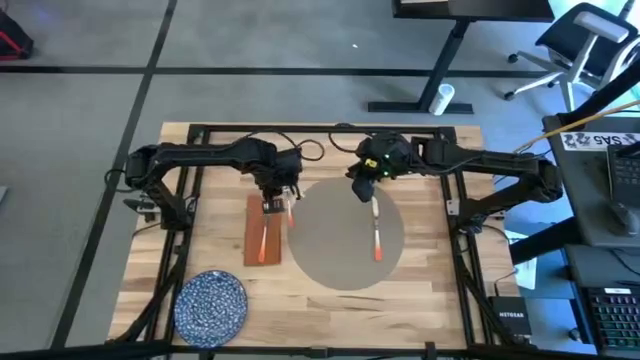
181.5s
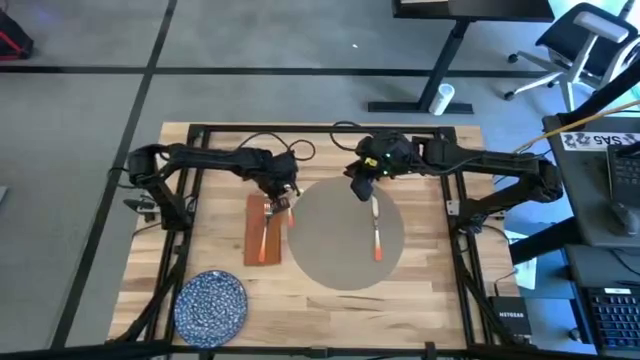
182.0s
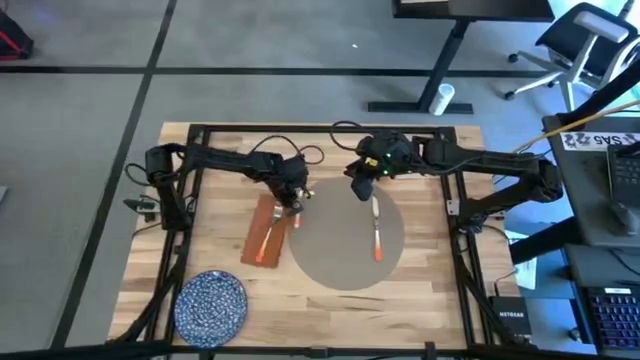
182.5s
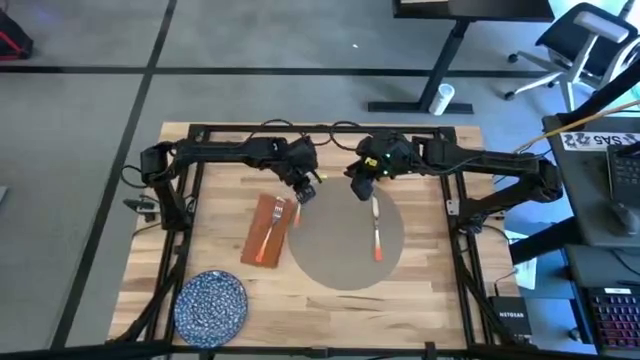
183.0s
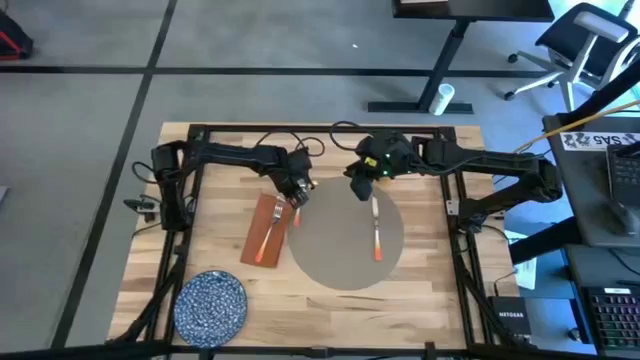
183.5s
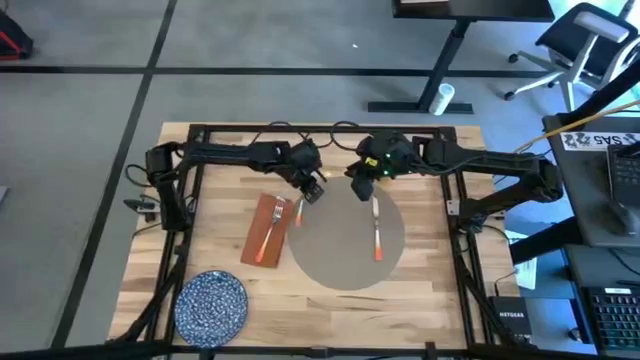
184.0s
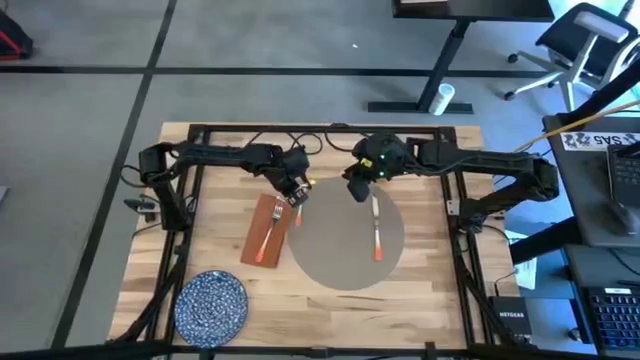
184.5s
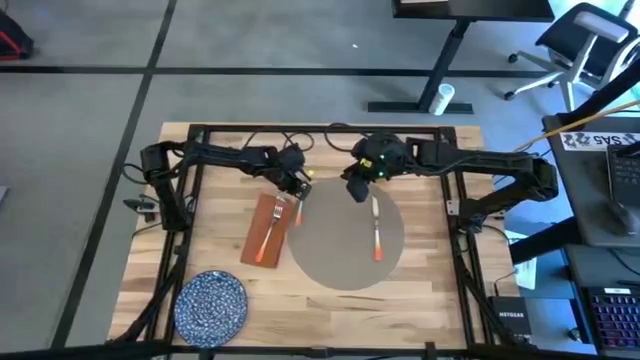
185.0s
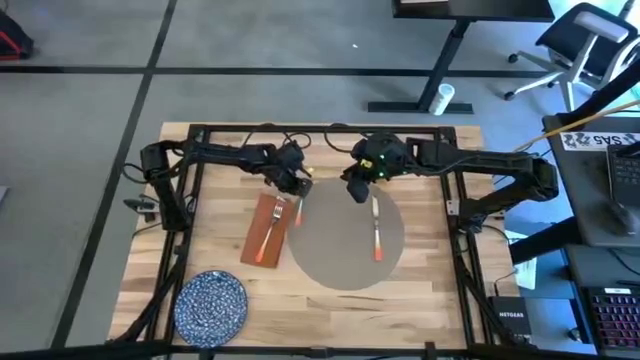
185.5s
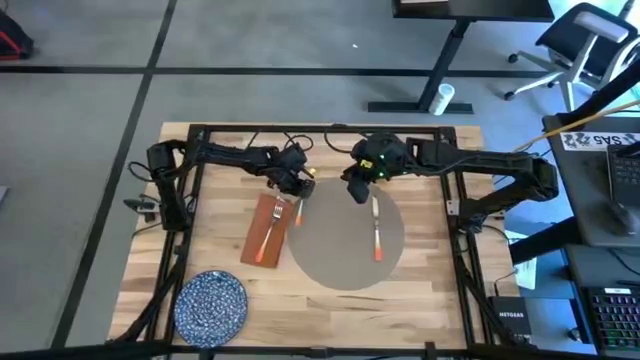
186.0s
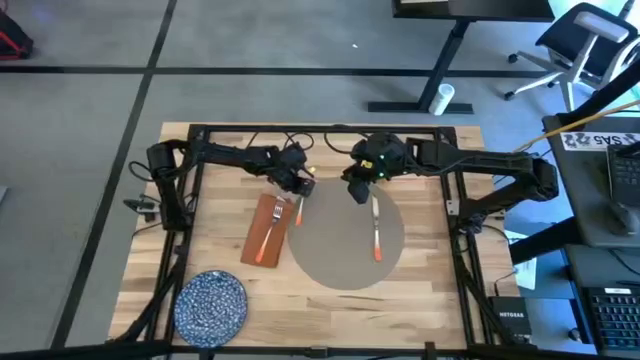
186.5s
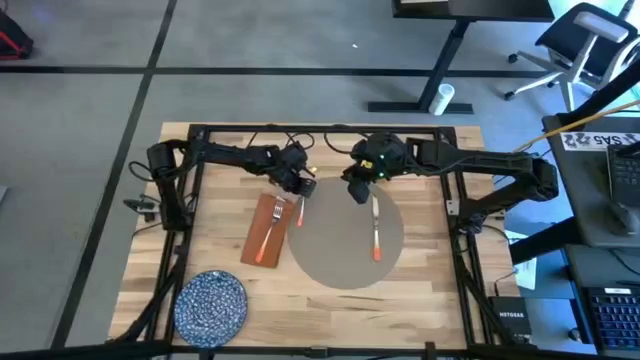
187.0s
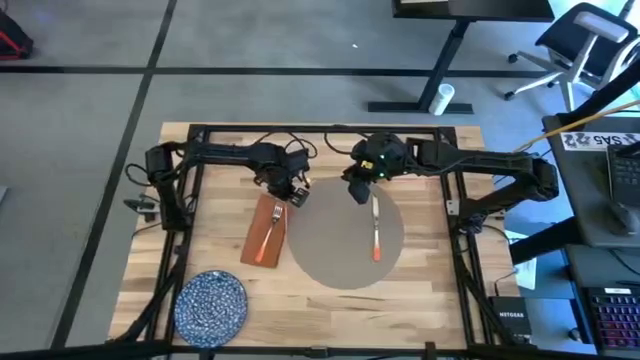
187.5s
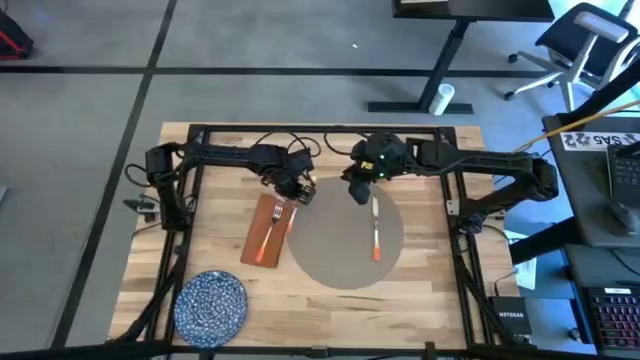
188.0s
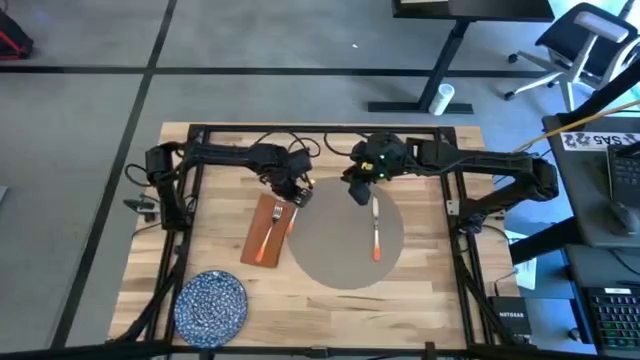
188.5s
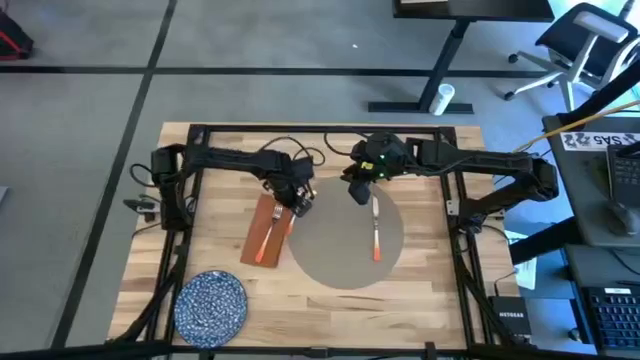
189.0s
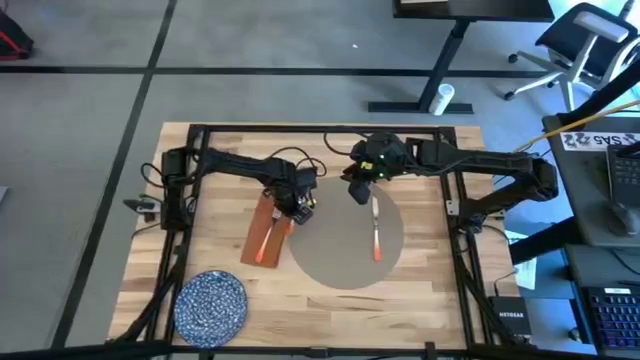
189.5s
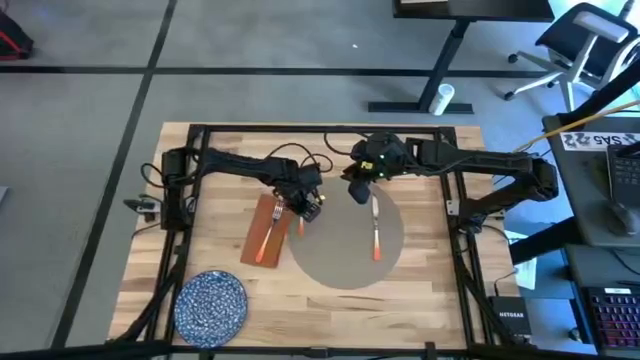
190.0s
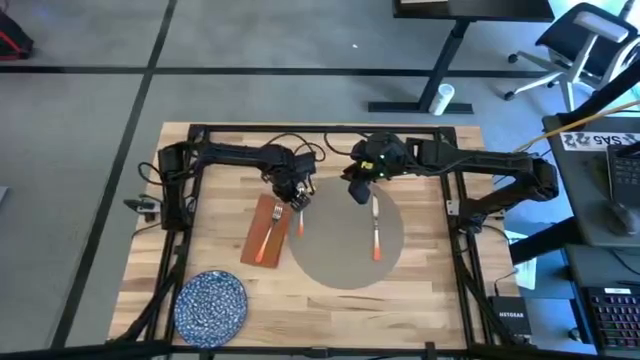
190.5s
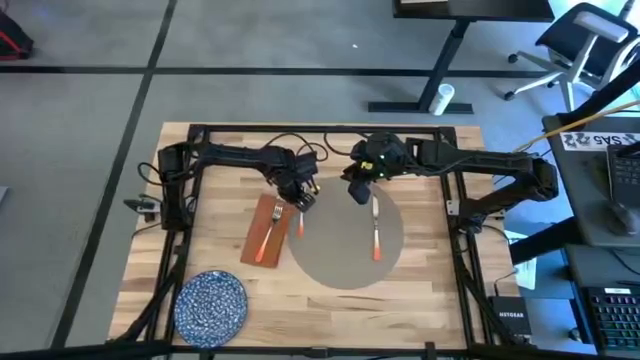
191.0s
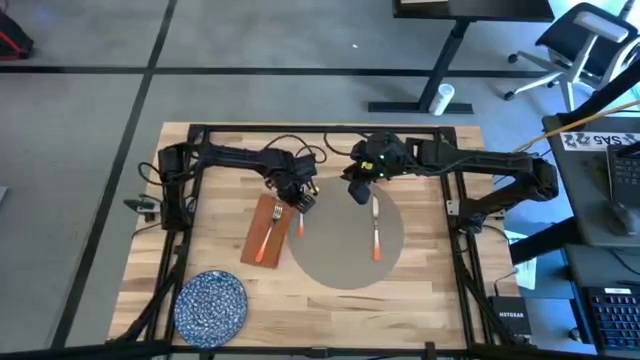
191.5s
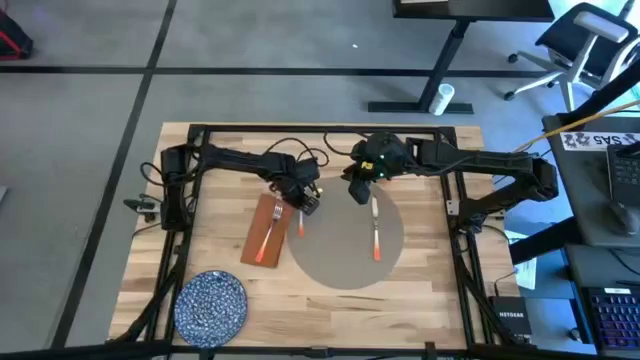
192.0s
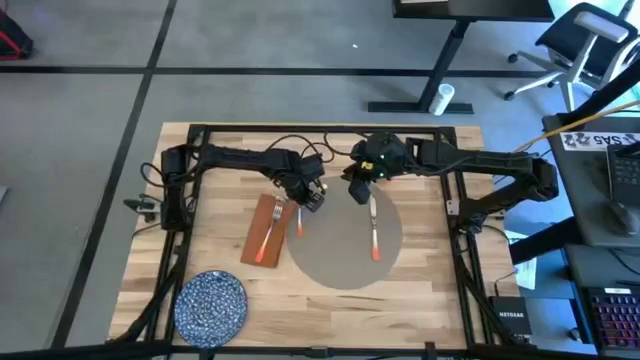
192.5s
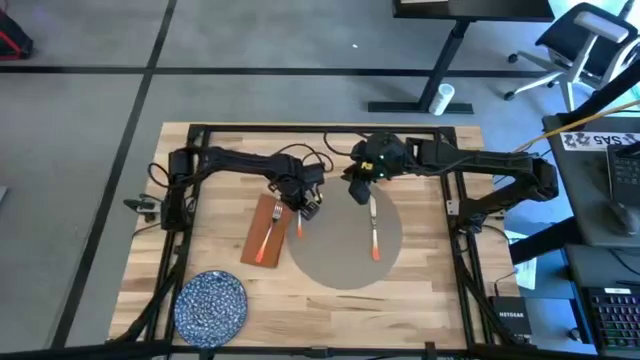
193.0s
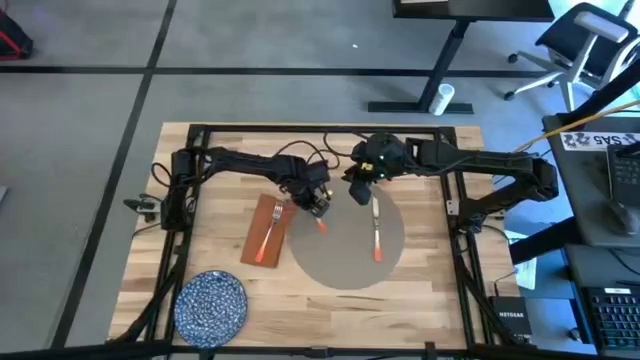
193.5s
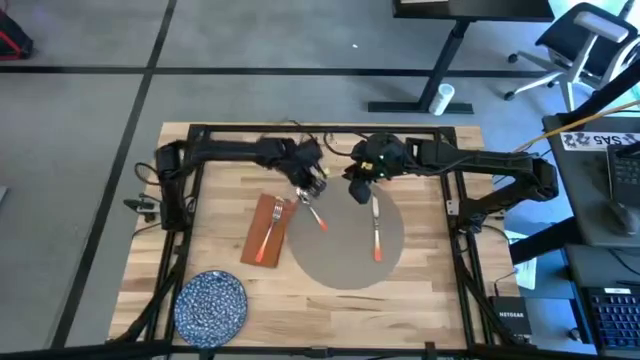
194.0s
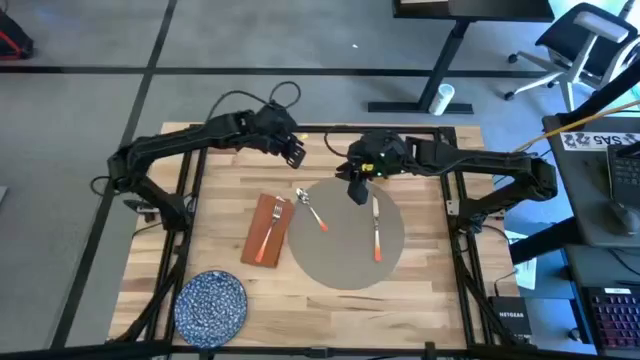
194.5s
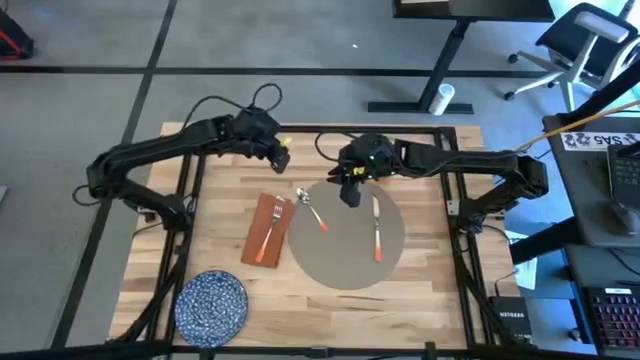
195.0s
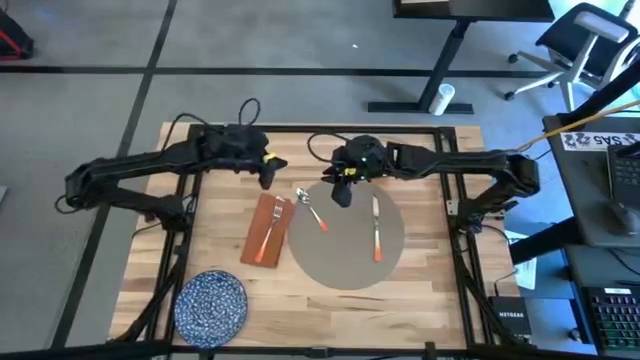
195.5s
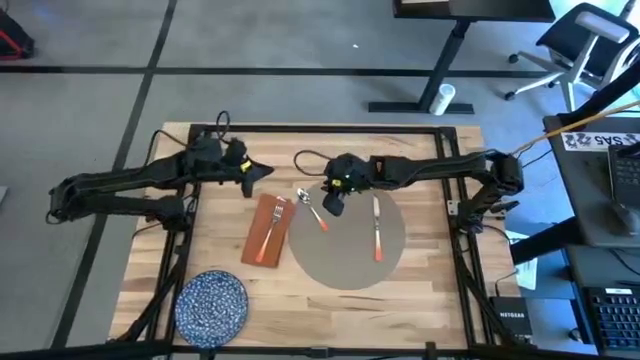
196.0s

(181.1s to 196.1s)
Task: Set table place
Put the orange spoon on the gray mat

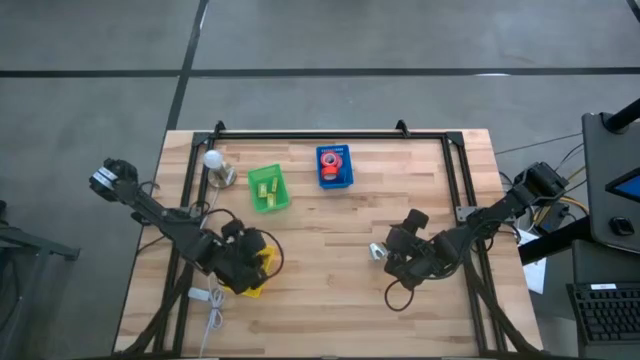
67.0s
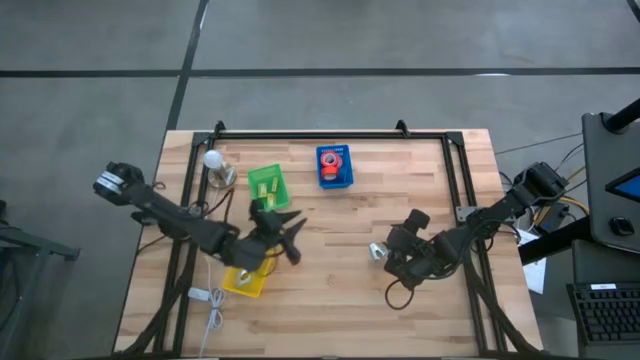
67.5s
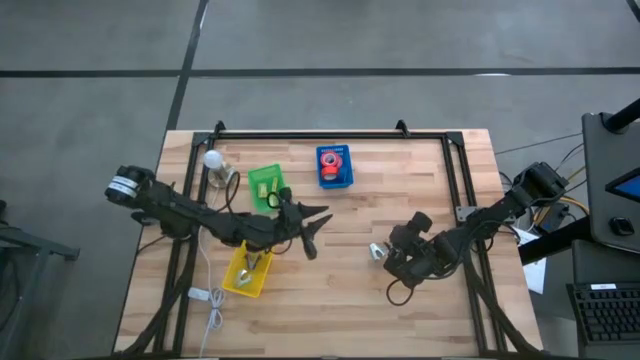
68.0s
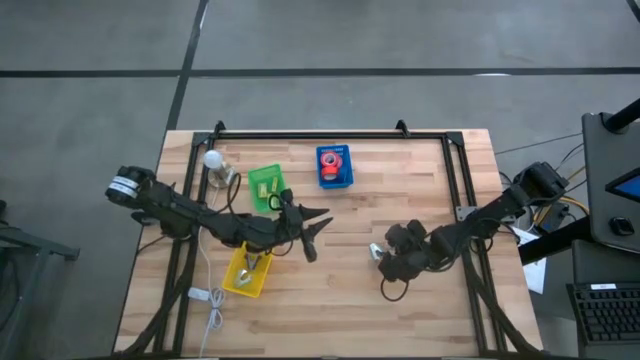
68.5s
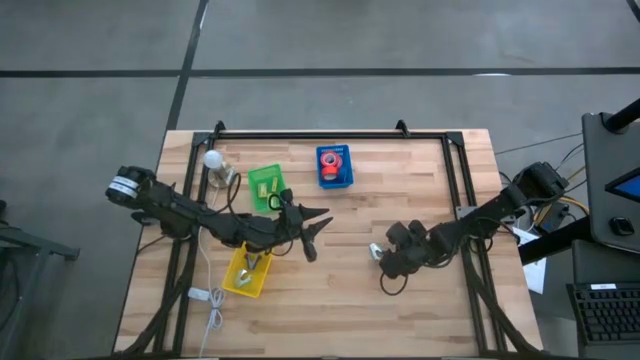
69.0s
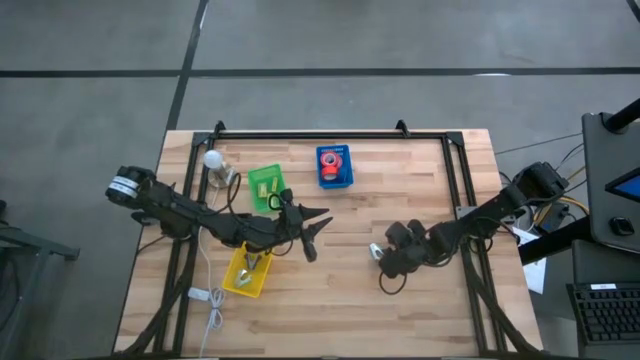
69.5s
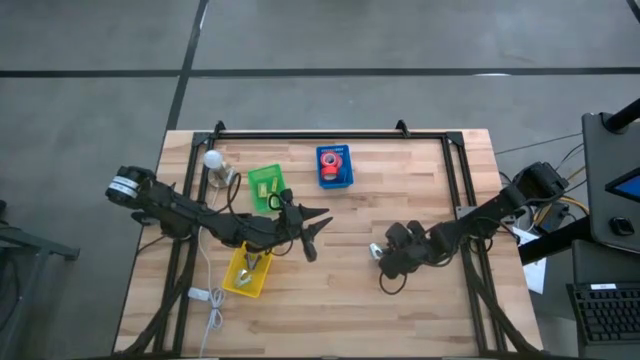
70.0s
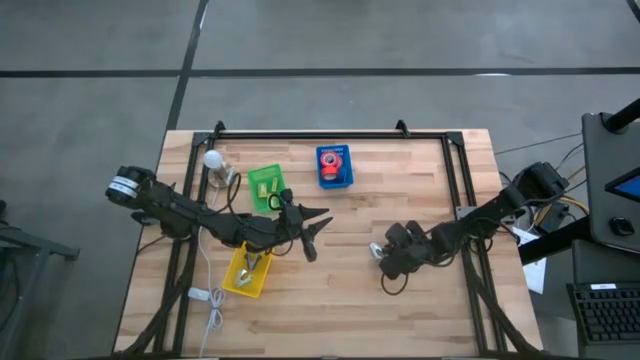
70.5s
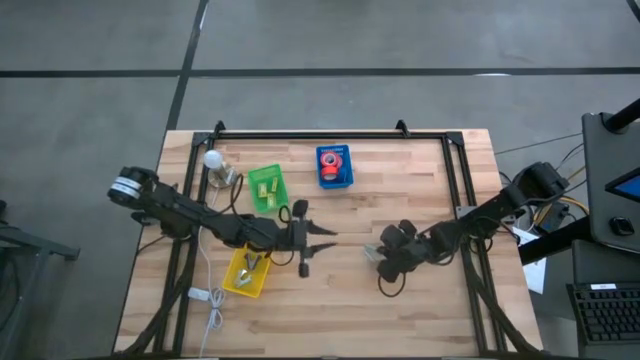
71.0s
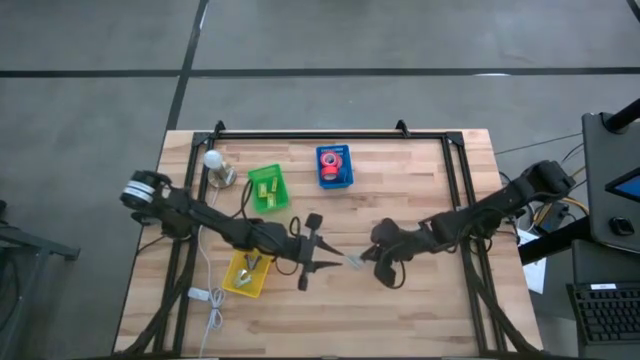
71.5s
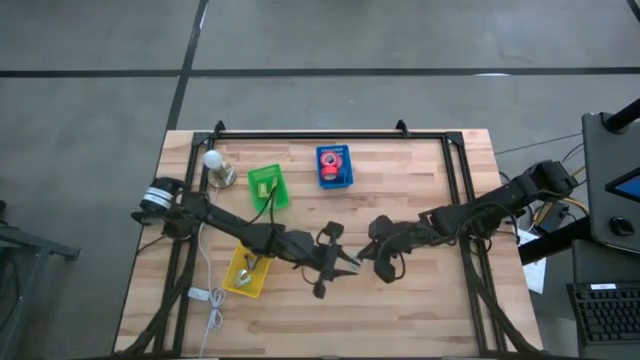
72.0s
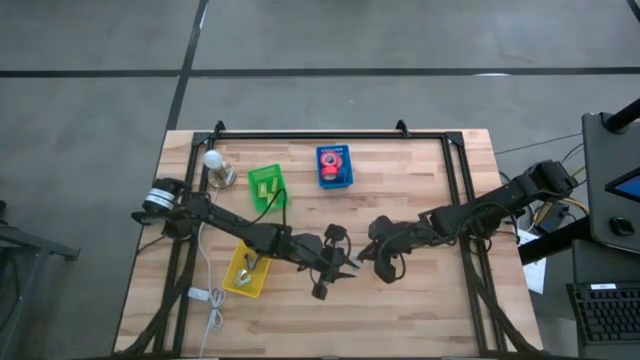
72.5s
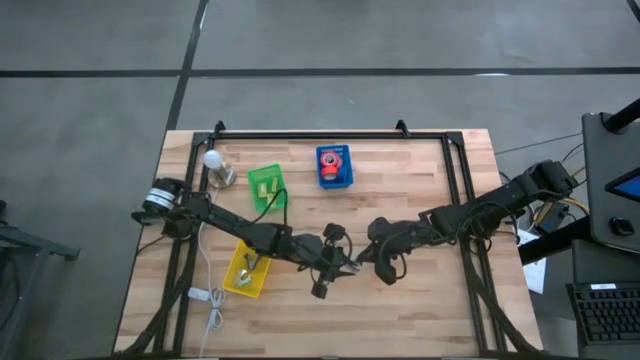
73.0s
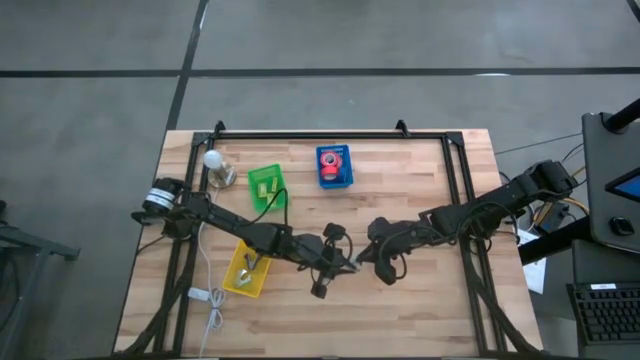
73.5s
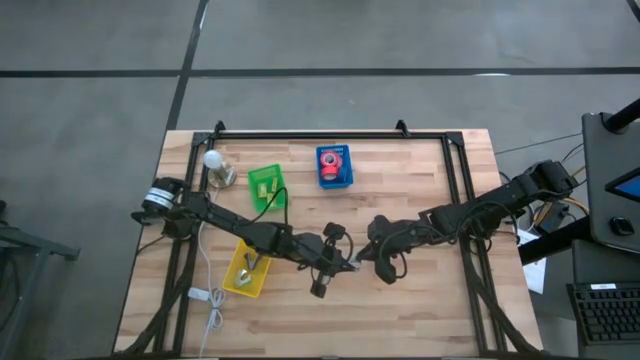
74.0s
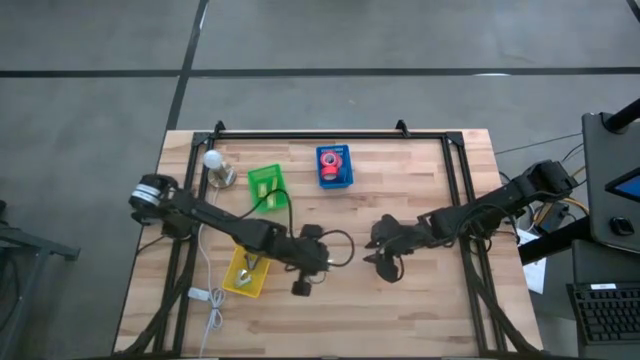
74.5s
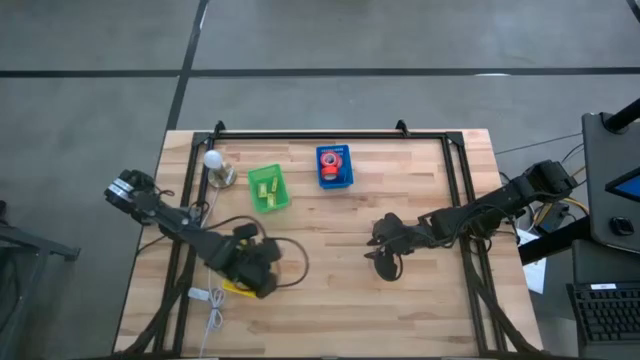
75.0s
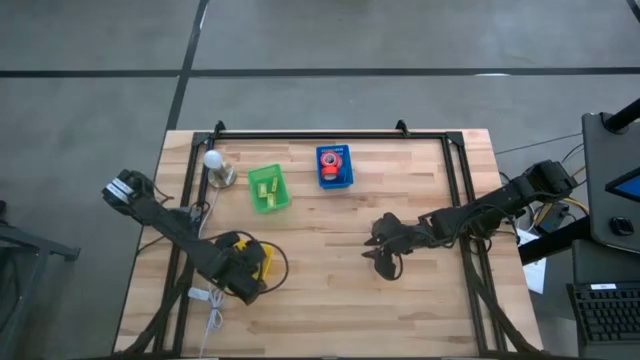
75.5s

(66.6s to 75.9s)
Task: Pick and place Stapler, Stapler remover, tape
Put the blue staple remover into the yellow bin
